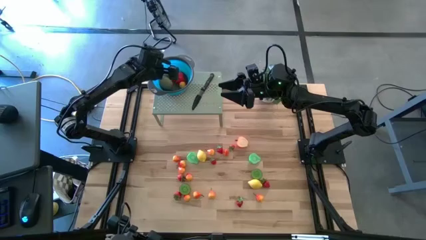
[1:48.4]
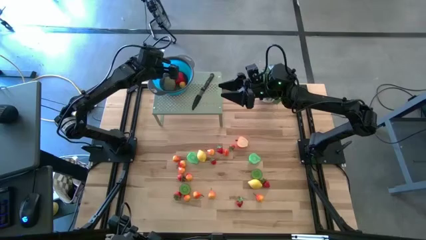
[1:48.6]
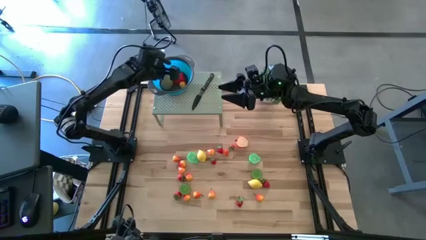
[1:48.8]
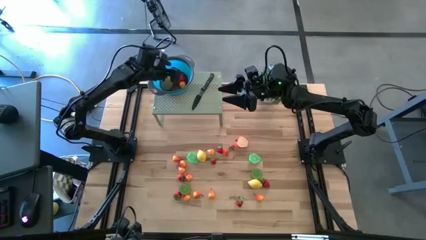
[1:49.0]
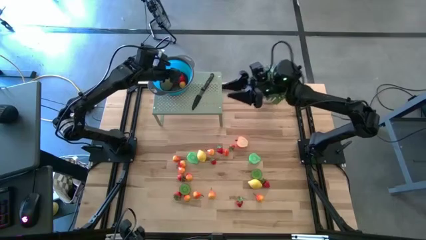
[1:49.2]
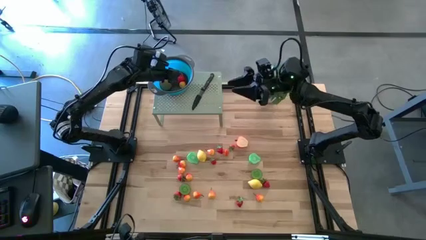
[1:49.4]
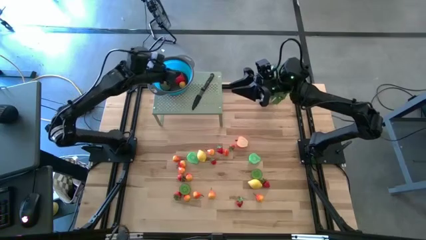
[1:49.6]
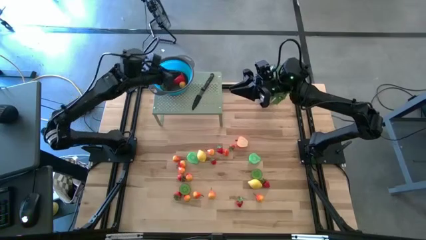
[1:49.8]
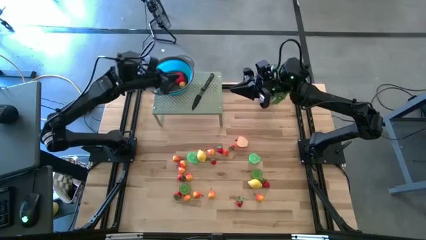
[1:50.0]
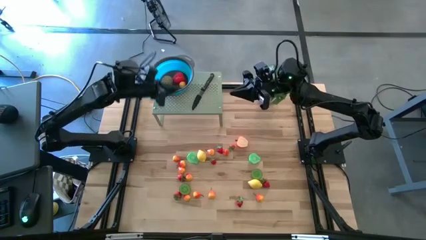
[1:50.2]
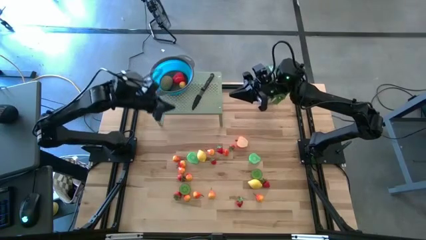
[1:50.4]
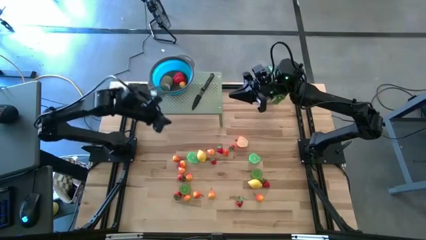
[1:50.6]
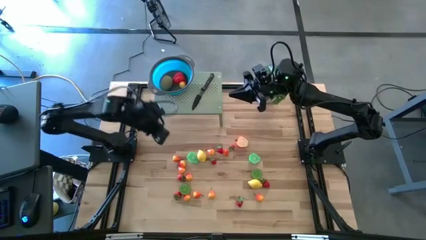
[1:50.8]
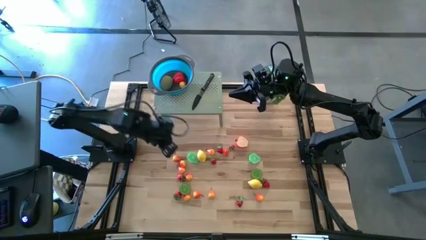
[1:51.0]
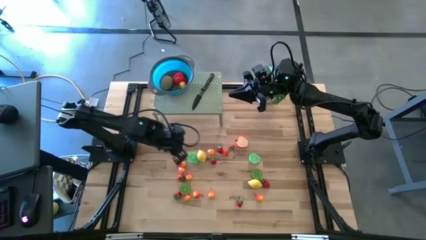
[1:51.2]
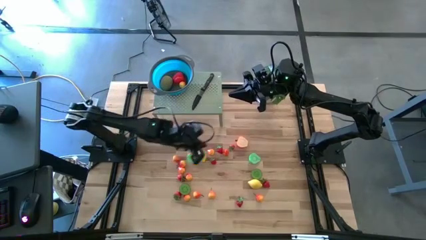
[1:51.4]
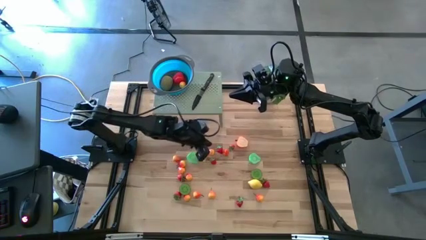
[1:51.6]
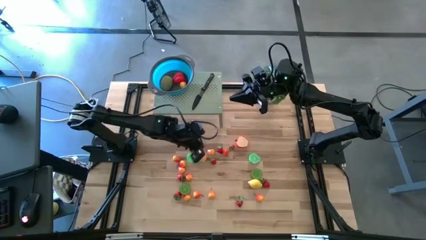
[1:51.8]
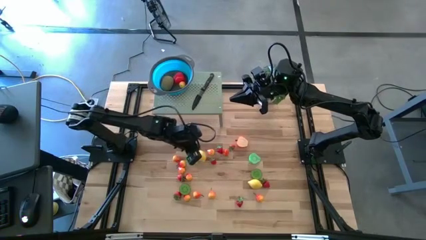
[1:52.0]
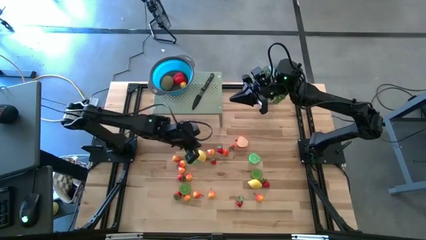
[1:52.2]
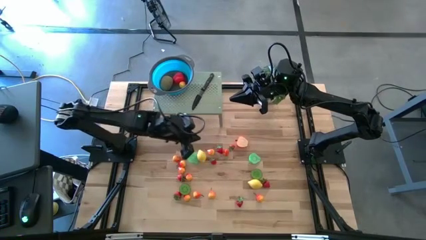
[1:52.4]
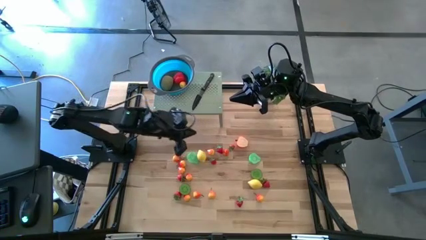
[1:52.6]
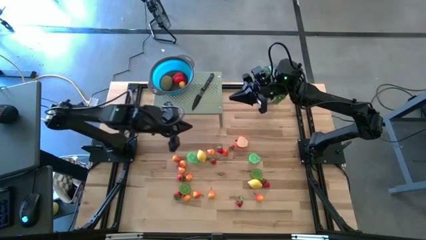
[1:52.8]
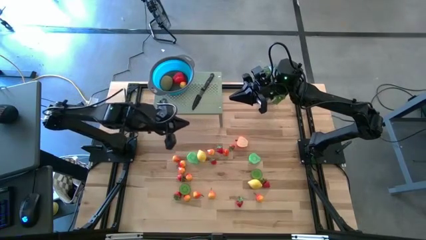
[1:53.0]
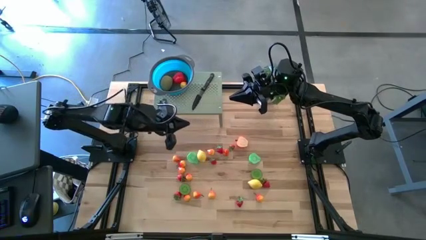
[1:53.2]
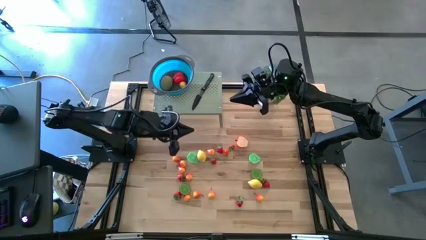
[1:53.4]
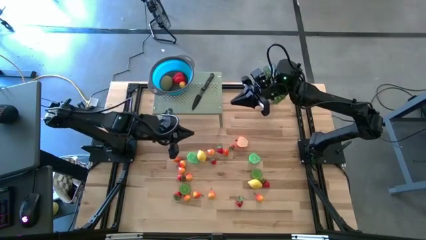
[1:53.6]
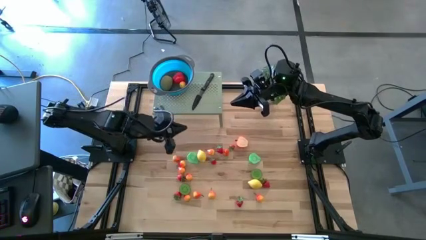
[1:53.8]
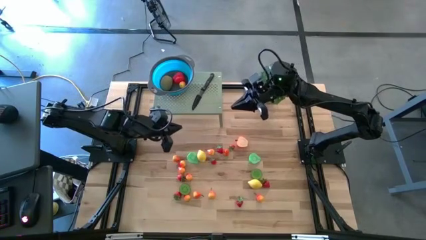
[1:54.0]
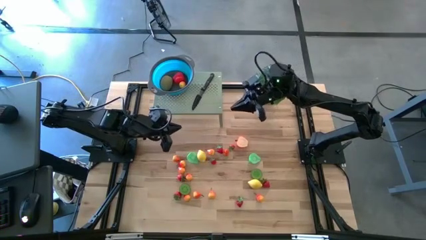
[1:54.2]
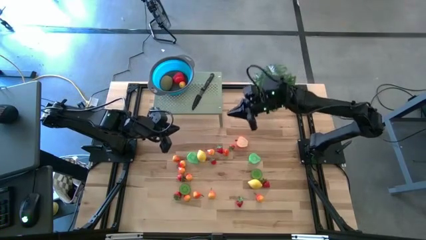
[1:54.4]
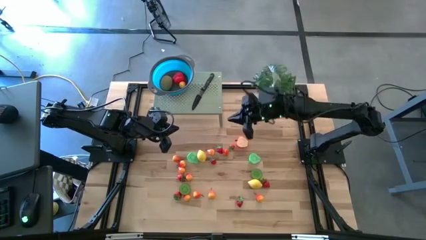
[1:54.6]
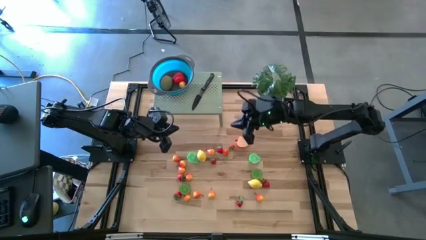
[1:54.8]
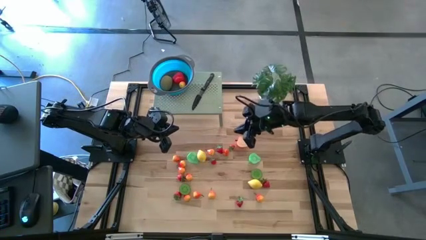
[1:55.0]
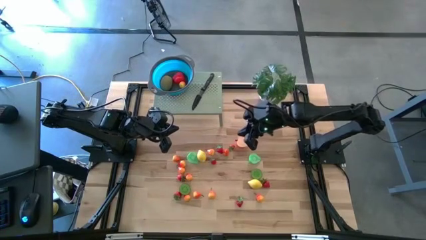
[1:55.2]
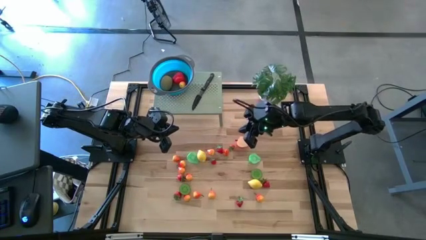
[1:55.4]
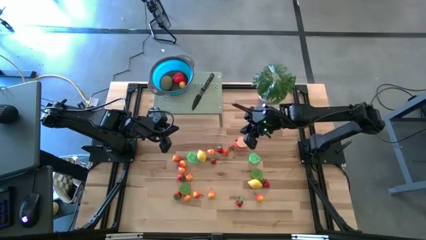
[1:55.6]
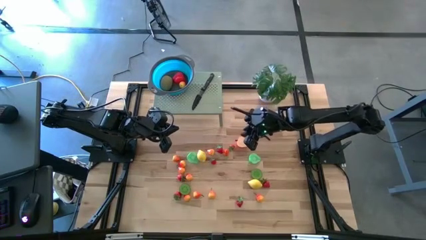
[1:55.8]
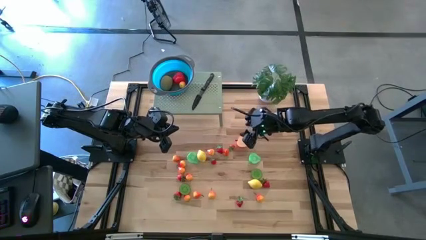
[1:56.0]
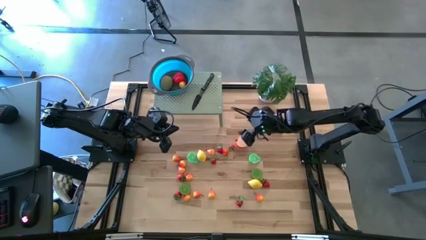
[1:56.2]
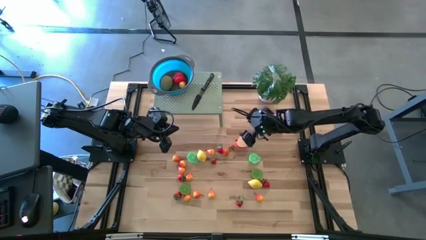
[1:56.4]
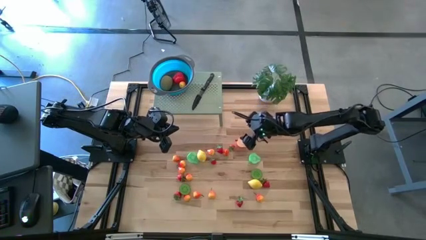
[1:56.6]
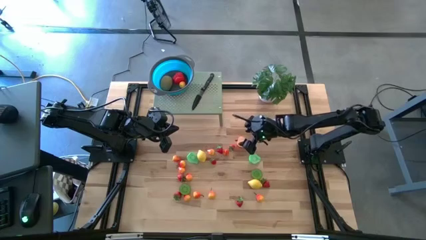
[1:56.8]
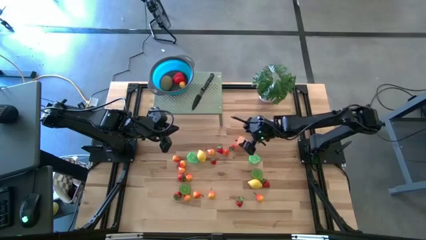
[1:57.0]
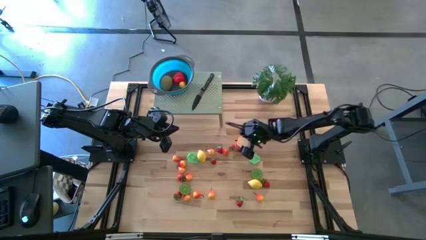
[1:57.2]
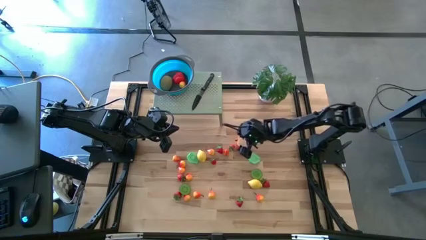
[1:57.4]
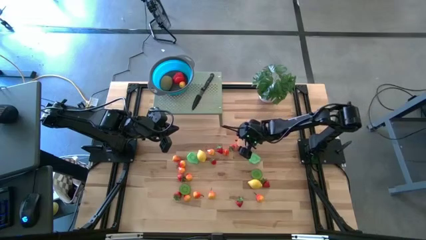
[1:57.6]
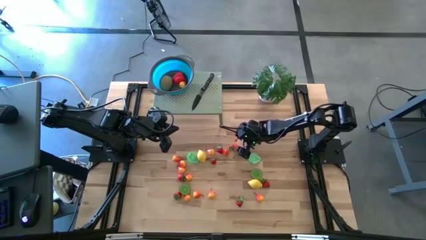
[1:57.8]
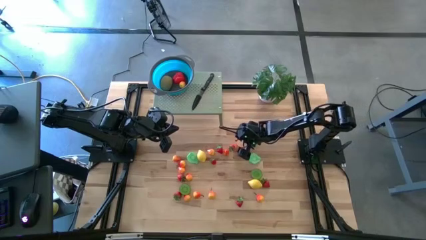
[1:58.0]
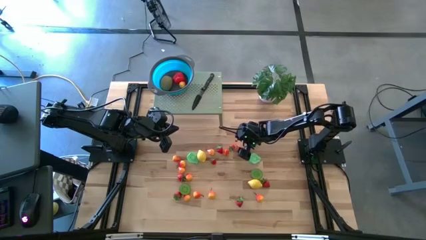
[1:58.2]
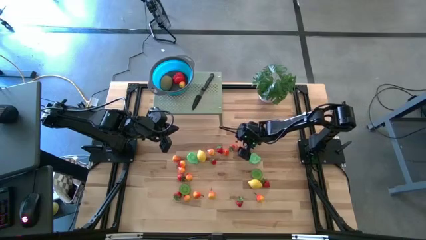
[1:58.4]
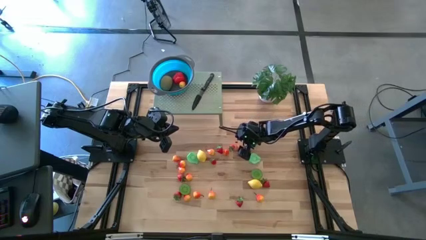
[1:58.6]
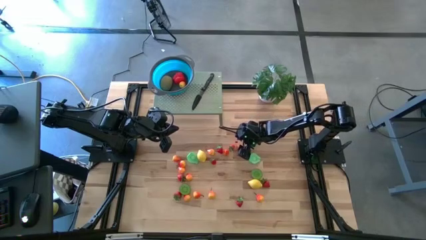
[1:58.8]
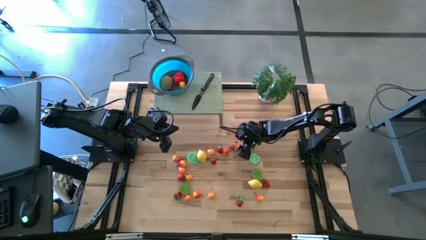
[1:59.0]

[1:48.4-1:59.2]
Task: Pick & Place Fruit
Put the half apple into the strainer bowl on the shelf

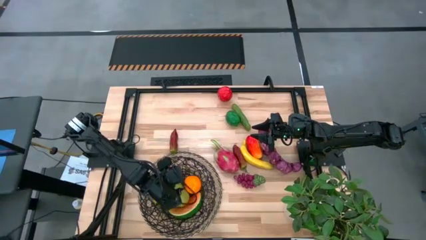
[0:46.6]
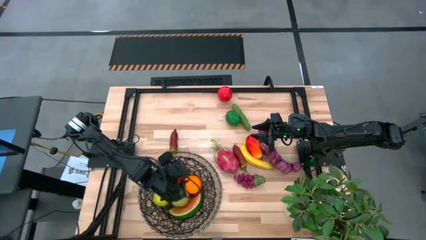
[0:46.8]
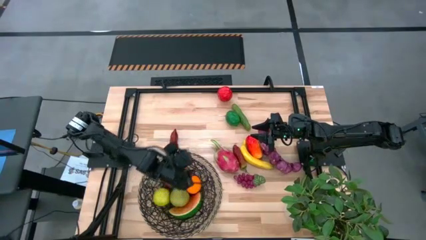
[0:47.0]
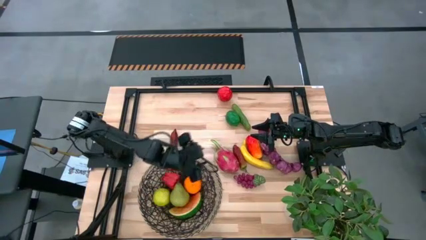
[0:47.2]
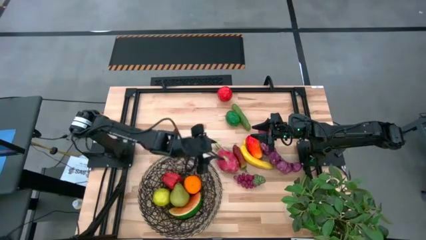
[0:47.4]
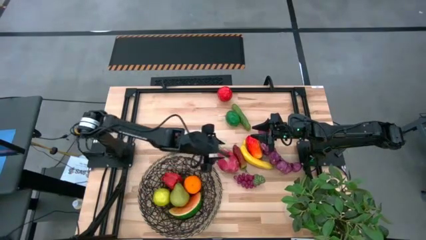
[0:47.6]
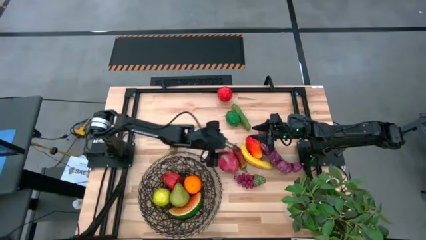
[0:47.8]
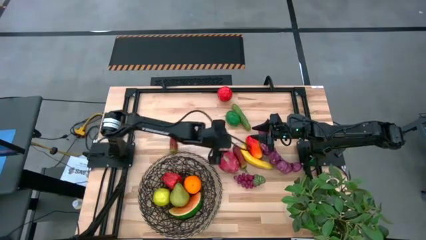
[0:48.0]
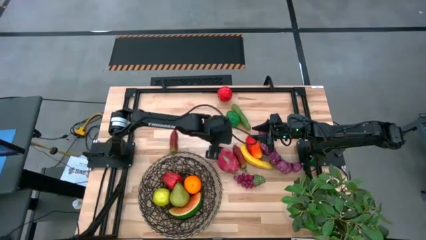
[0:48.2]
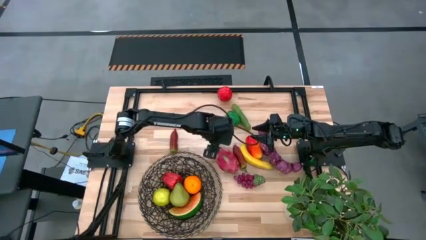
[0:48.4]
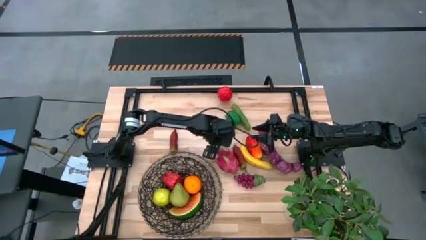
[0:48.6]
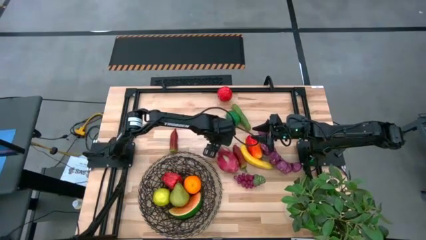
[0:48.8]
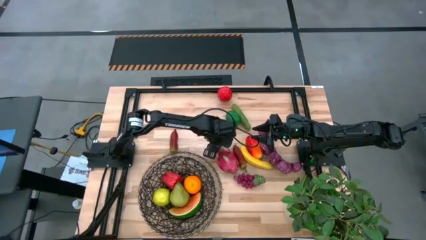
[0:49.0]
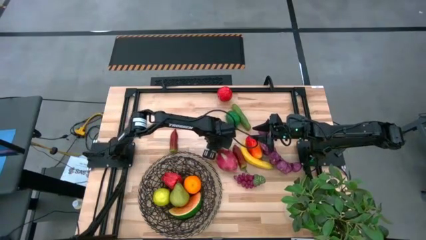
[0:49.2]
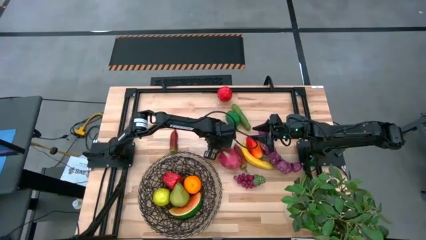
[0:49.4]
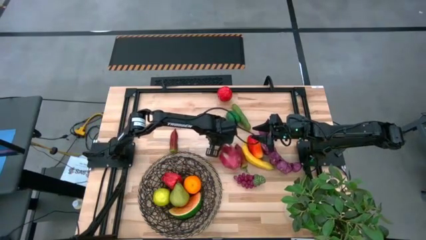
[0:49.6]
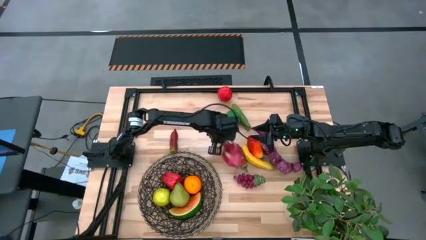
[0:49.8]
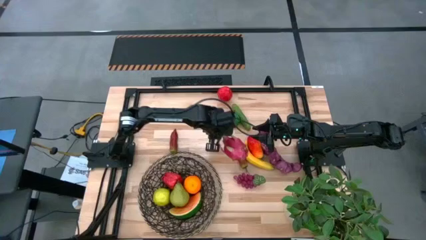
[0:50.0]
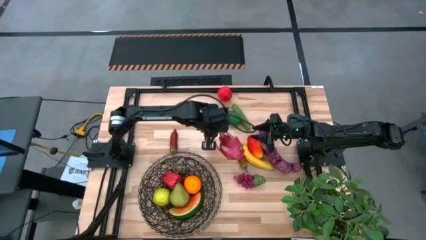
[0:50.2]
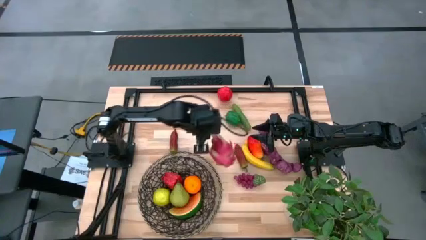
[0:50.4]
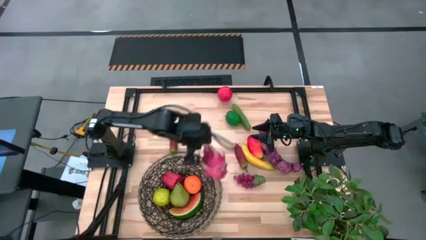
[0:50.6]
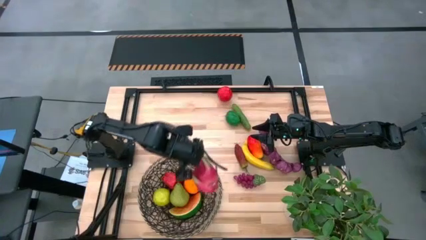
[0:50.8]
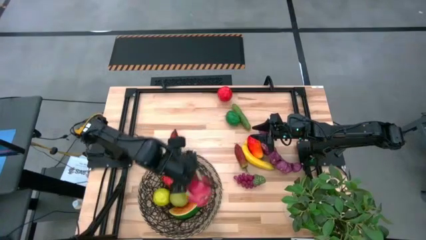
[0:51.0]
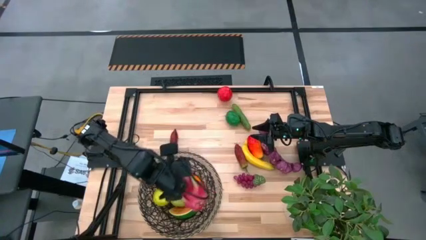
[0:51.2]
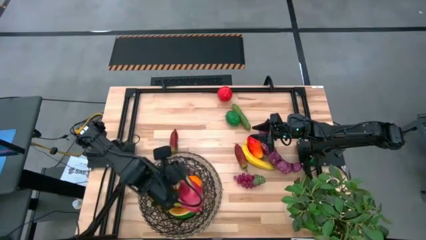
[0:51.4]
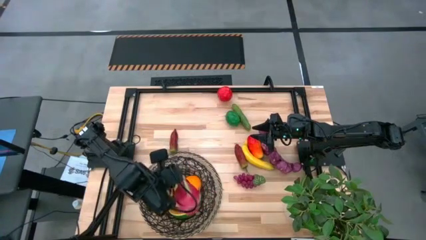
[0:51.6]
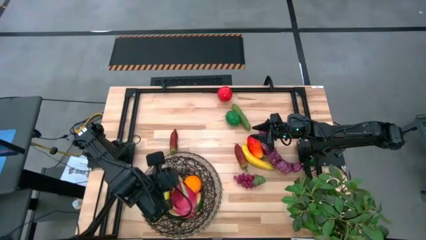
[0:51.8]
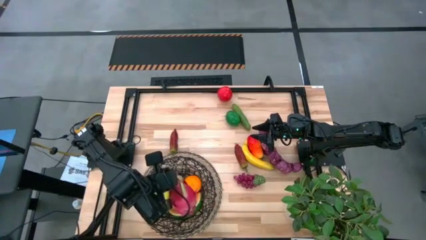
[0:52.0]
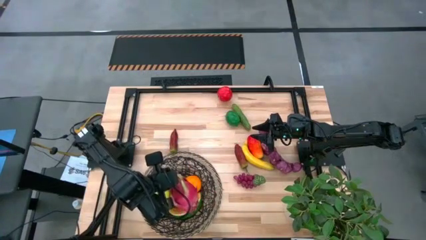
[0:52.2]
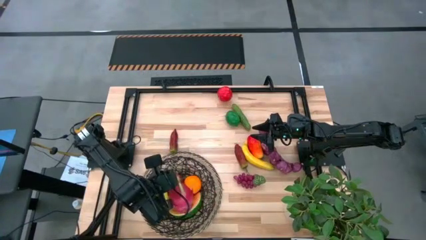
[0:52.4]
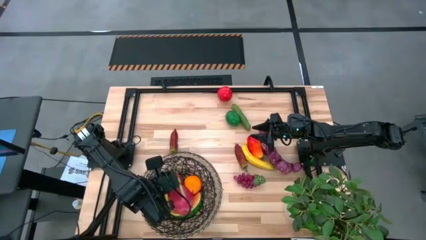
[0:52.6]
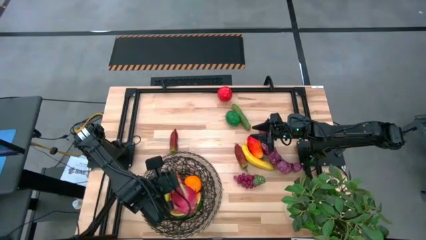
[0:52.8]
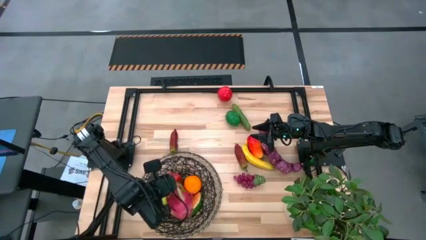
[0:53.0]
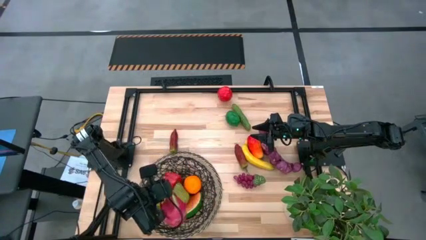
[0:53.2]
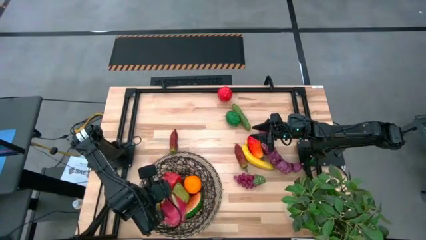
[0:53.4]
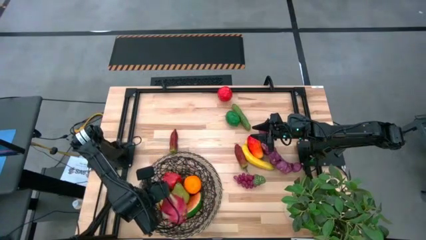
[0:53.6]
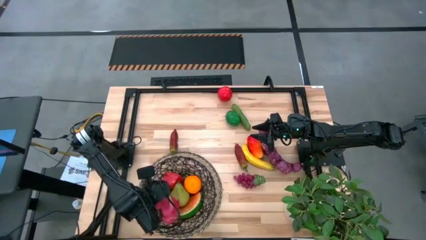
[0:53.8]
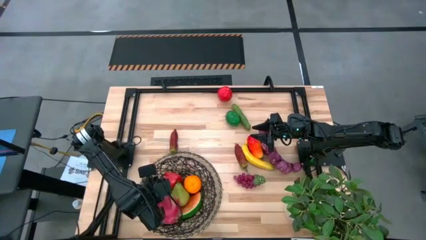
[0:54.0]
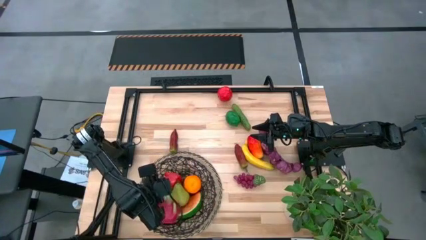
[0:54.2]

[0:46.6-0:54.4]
Task: Build produce basket
Put the dragonfruit into the woven basket
